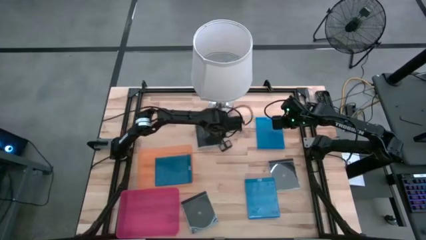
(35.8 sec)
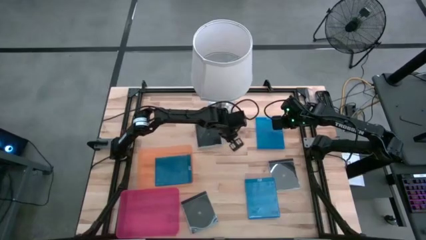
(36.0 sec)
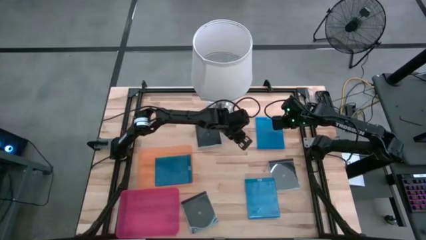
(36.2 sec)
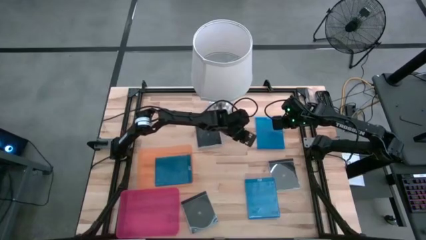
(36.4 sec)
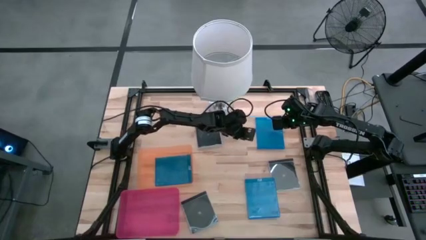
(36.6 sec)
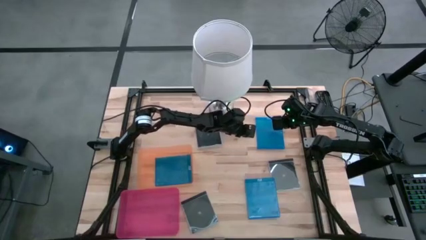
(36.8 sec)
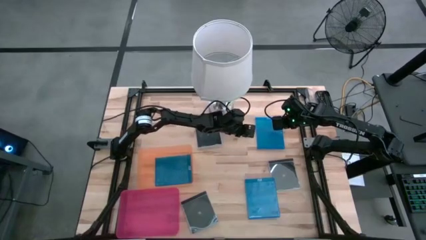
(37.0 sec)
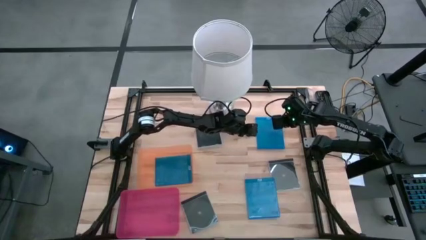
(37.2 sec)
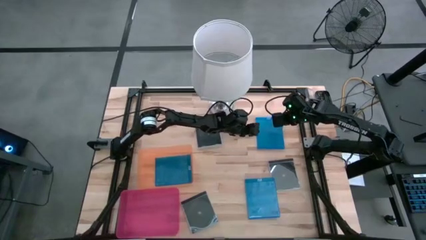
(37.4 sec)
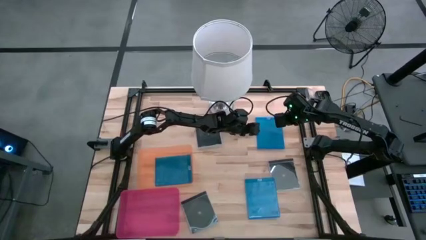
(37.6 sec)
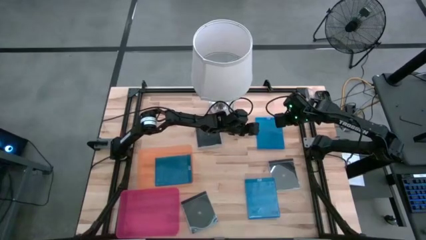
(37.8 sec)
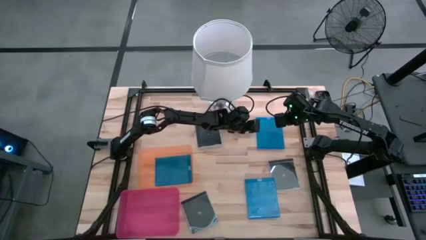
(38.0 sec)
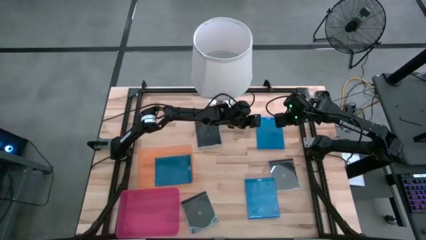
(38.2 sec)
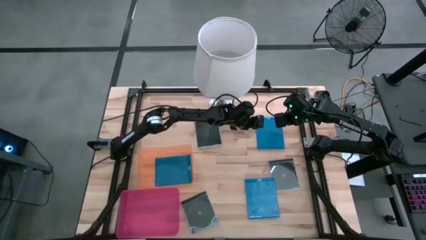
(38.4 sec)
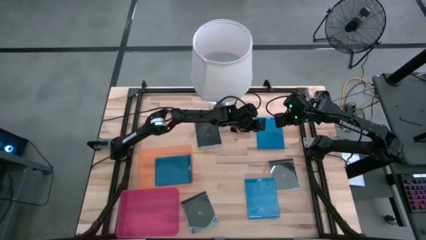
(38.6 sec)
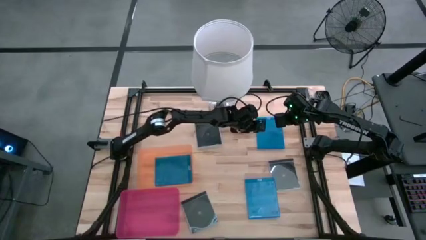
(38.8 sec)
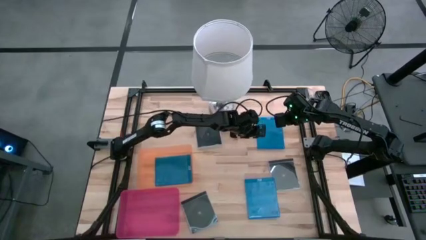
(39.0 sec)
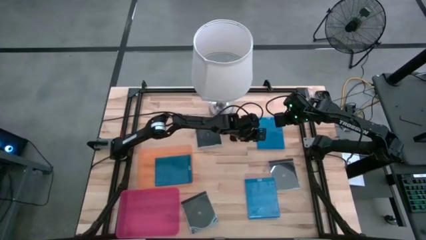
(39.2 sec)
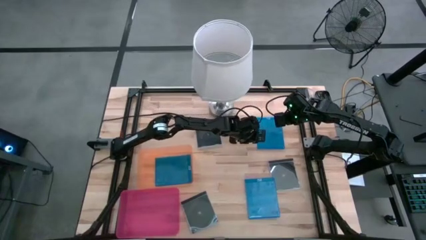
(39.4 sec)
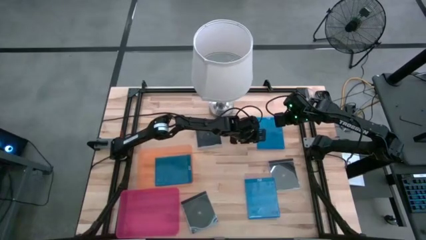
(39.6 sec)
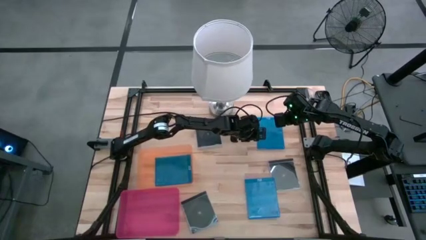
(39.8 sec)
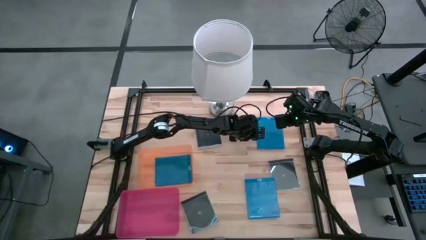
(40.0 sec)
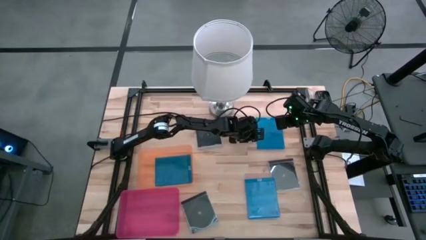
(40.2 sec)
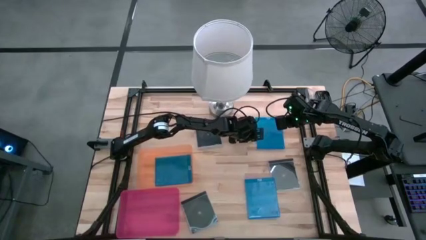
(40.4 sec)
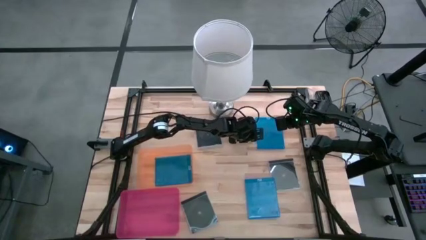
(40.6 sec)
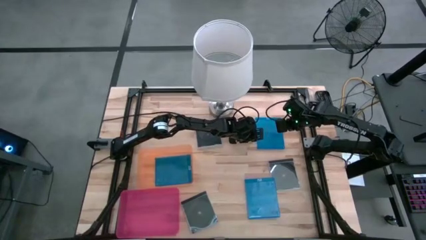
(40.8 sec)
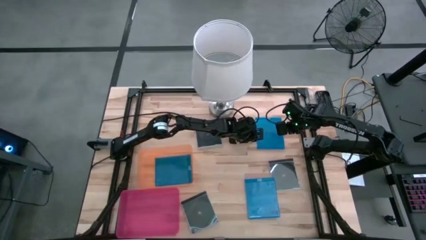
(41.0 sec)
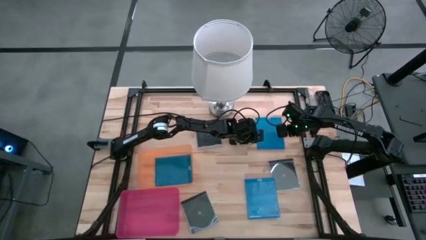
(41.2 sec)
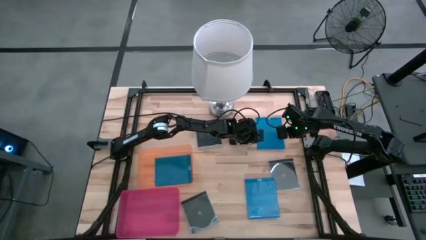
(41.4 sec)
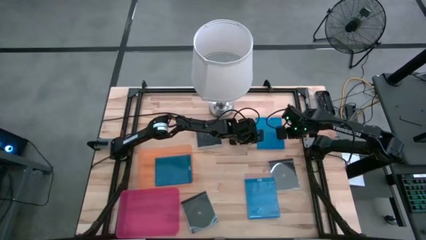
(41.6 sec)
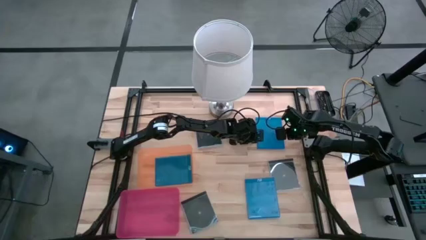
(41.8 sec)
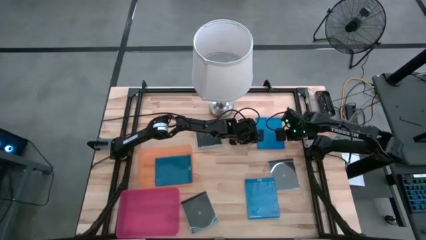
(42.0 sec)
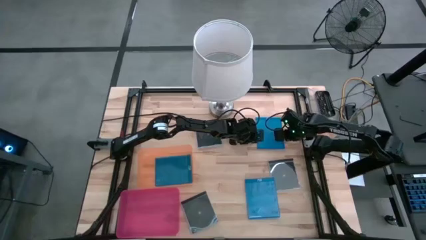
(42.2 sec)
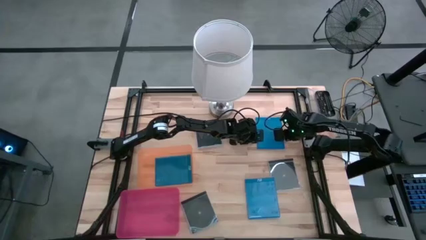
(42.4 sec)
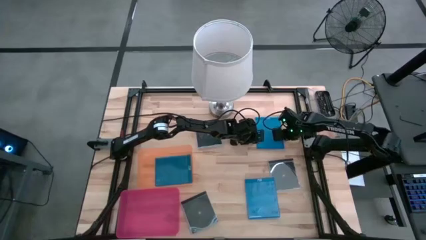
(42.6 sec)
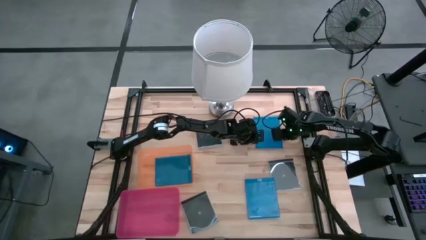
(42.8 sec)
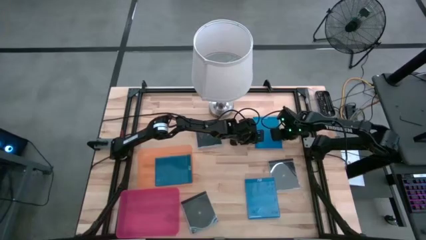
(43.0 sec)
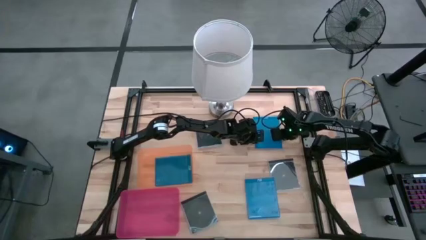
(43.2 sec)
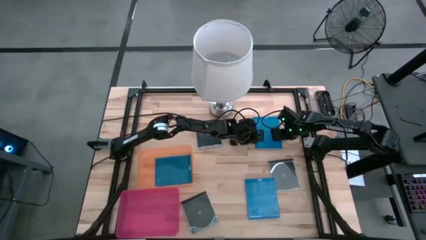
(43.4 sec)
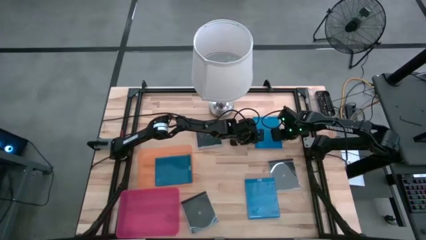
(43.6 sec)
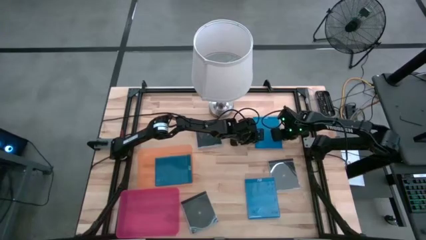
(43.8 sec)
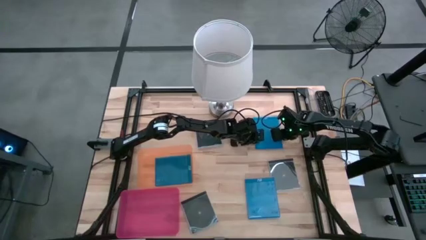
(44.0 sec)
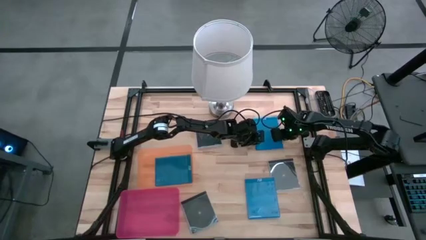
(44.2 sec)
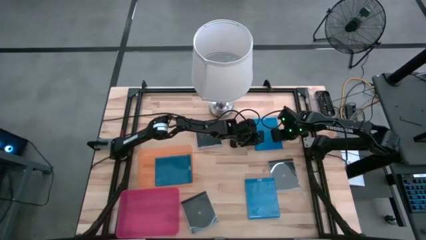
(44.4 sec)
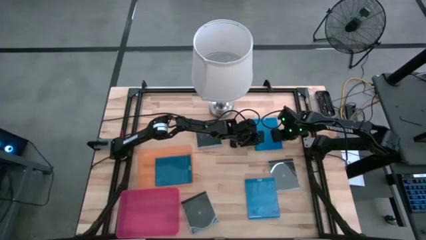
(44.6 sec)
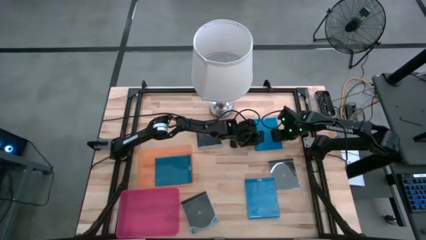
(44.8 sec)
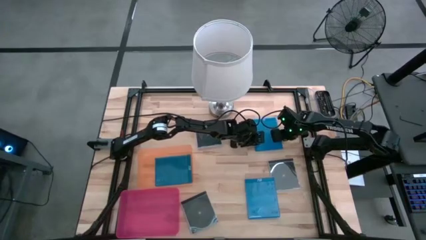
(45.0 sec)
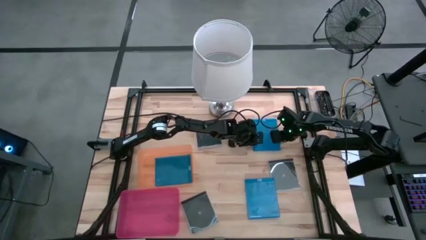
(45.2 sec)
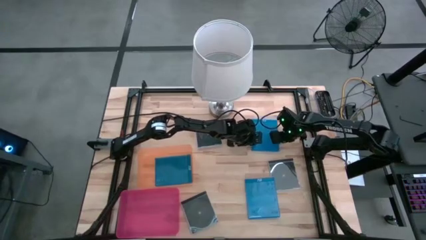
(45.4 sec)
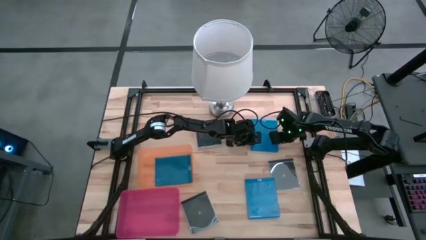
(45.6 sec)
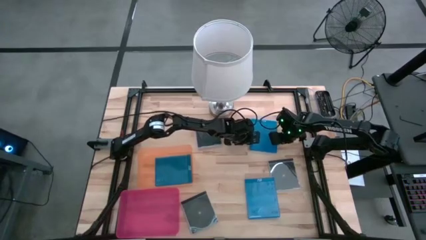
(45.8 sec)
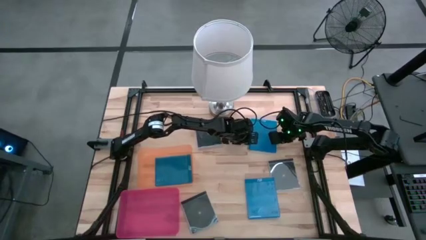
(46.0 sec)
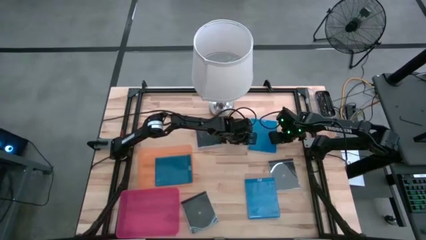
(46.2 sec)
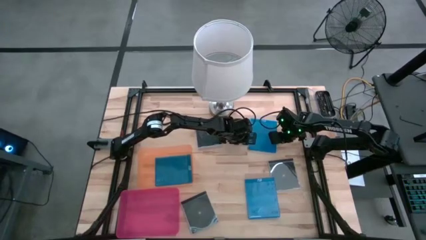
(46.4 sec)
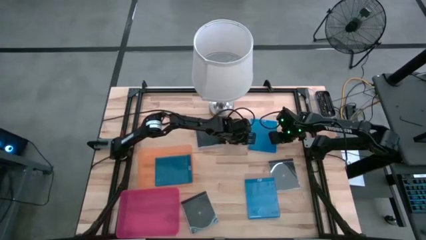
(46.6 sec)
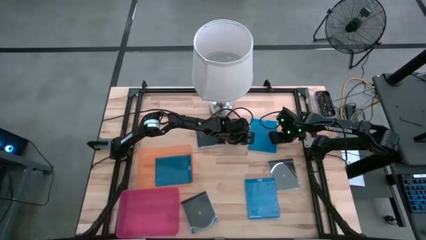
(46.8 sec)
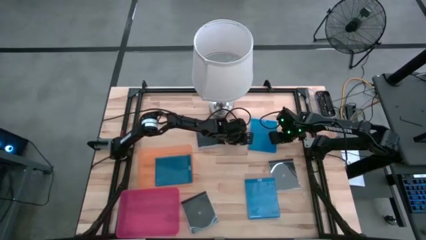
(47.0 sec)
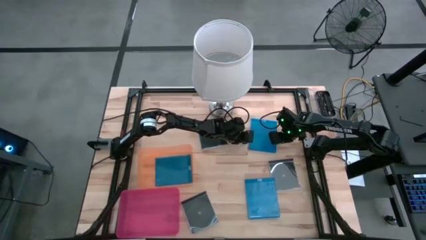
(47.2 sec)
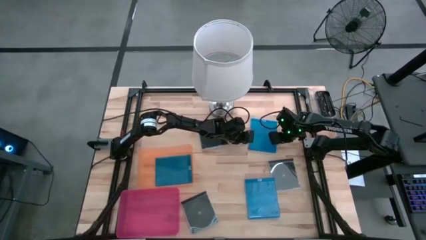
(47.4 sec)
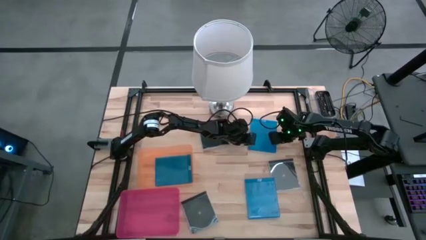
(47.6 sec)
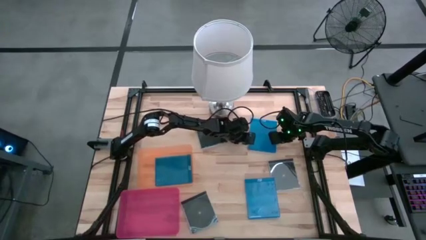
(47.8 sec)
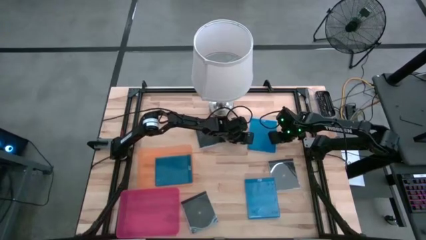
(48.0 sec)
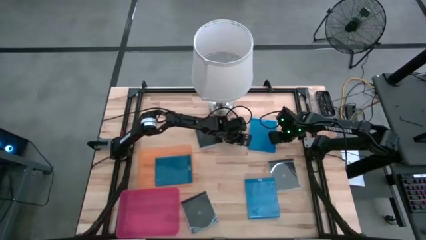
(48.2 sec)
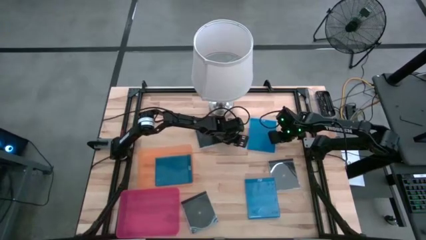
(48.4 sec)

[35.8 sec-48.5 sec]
Task: Pick & place jewel cases by type
Put the top blue cd case into the orange bin

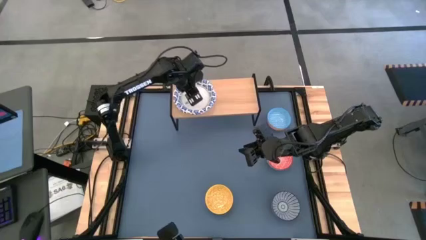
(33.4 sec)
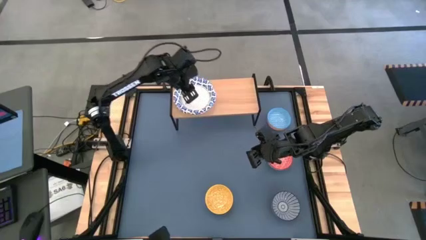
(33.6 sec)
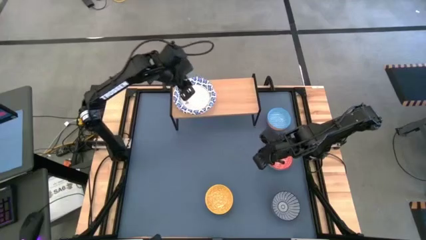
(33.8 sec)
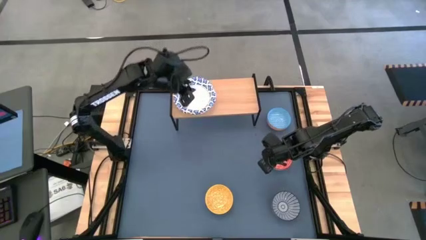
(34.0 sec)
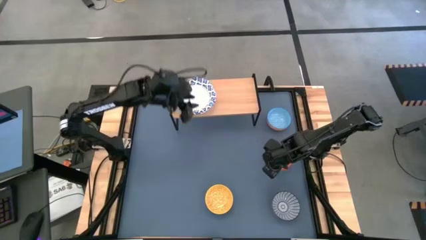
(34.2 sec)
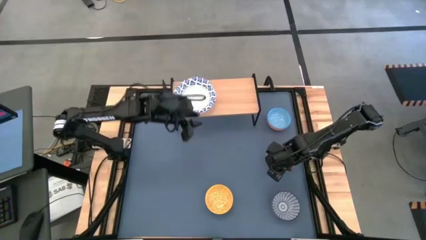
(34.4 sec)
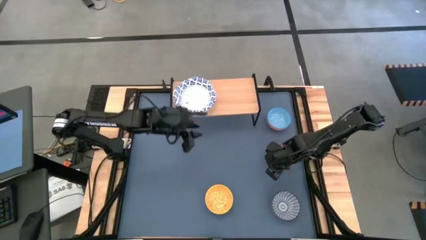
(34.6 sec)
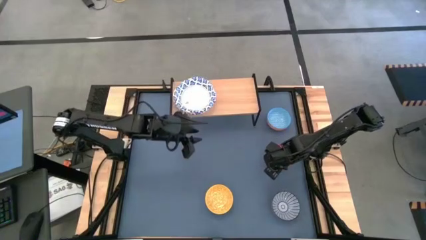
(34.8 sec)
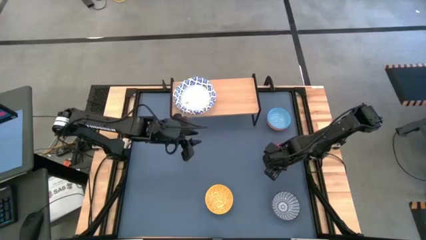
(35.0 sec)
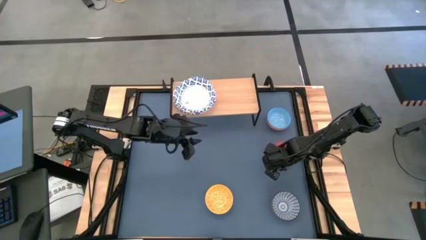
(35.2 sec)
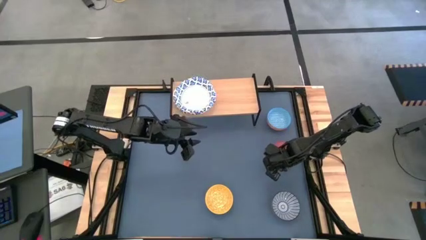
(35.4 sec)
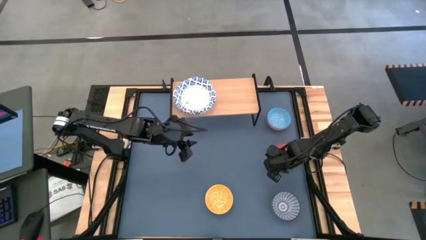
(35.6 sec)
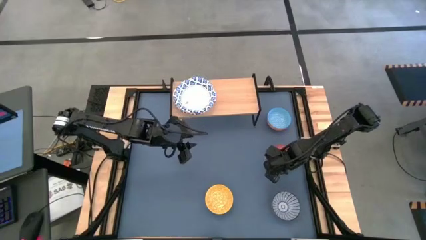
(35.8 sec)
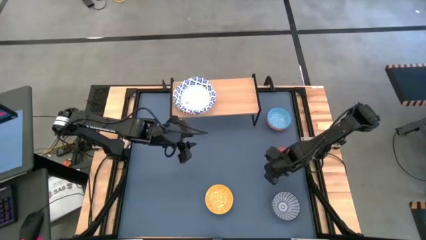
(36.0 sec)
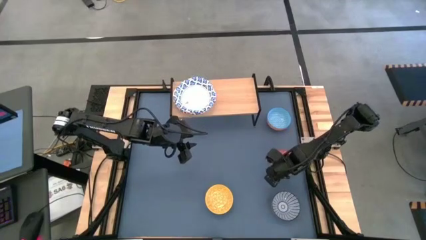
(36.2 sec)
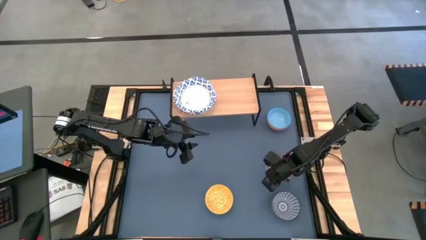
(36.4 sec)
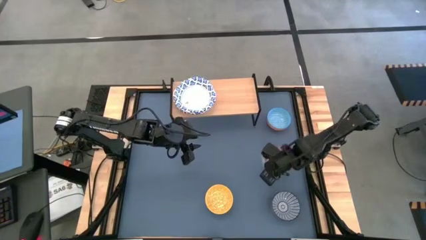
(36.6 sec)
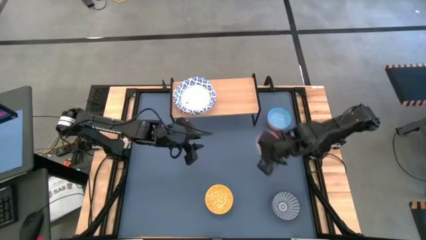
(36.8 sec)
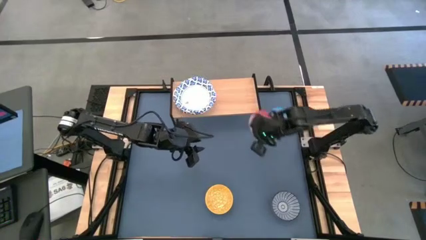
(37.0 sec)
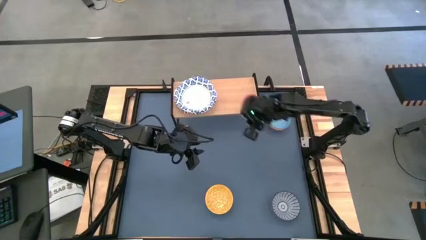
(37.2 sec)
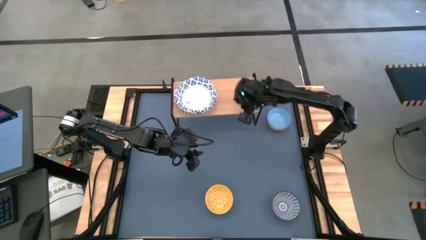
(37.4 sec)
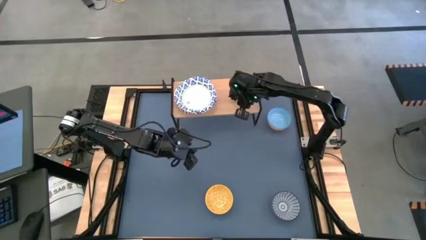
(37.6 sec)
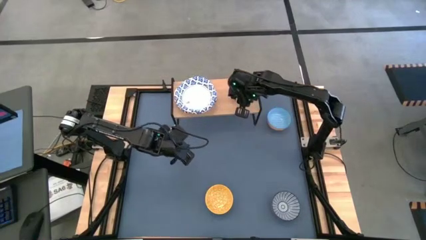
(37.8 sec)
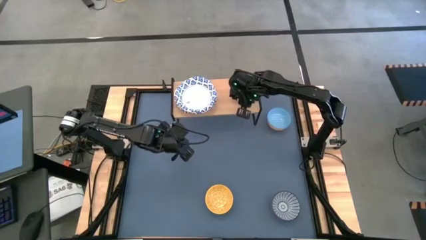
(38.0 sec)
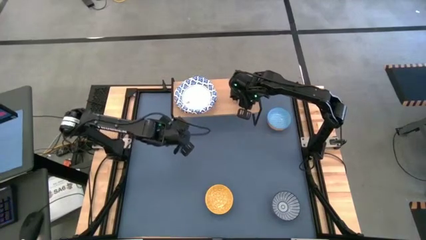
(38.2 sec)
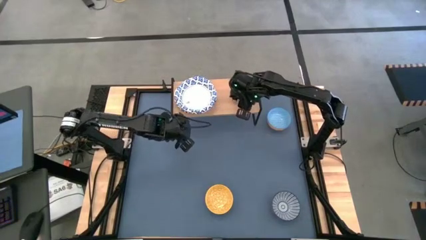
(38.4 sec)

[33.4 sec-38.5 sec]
Task: Place and stack bowls onto a shelf
Put the red bowl on the shelf
